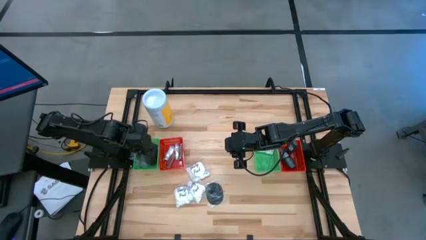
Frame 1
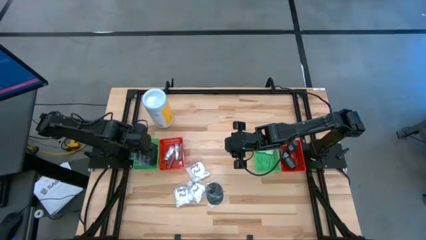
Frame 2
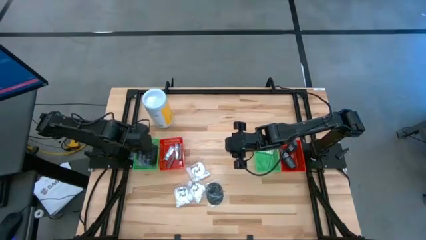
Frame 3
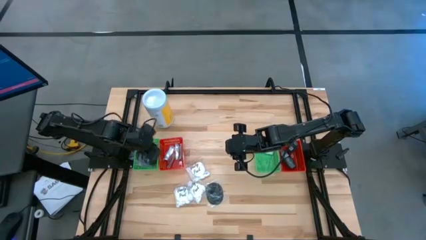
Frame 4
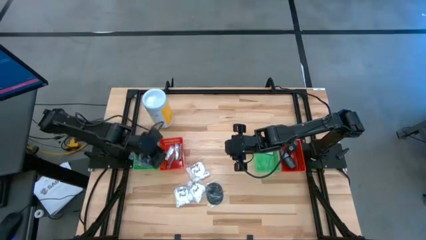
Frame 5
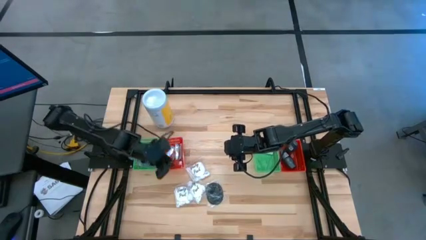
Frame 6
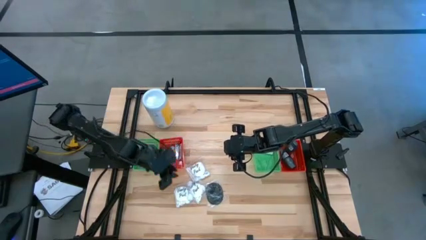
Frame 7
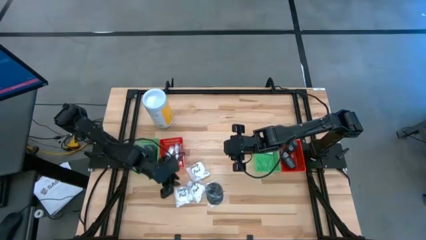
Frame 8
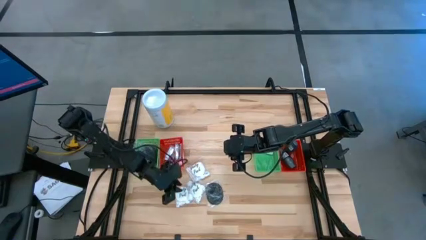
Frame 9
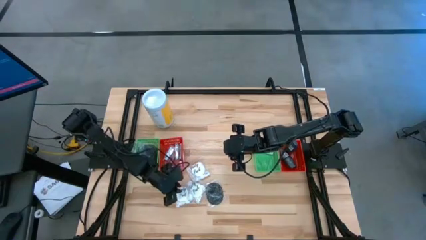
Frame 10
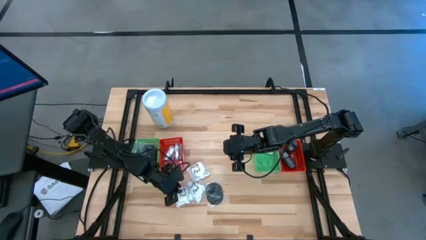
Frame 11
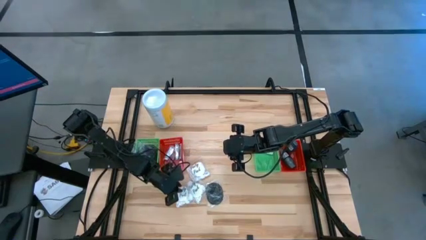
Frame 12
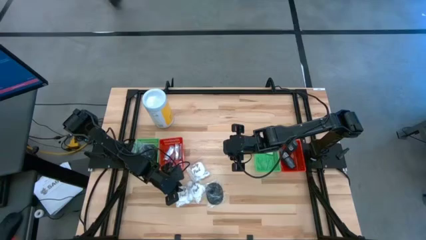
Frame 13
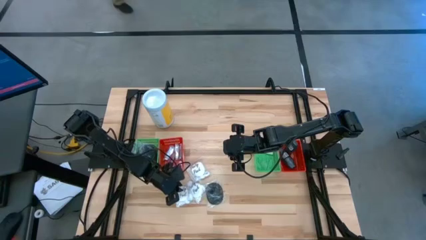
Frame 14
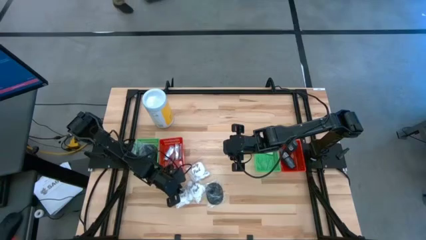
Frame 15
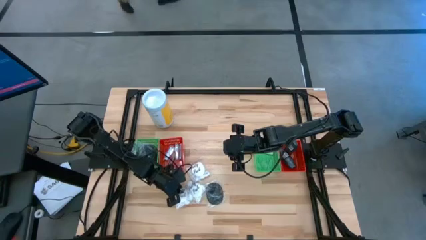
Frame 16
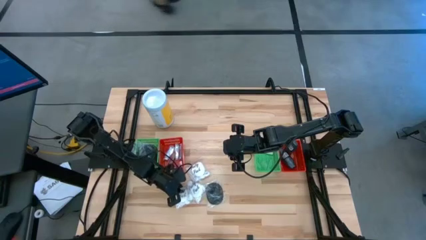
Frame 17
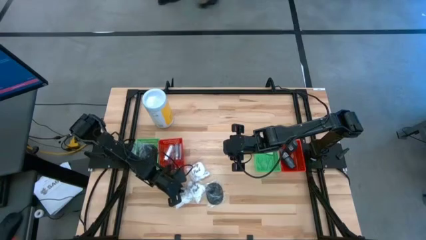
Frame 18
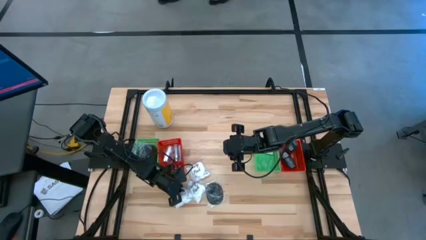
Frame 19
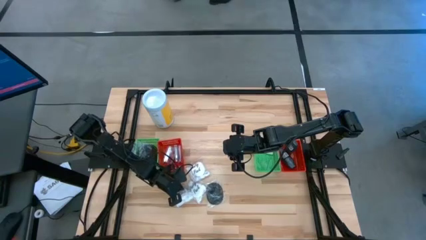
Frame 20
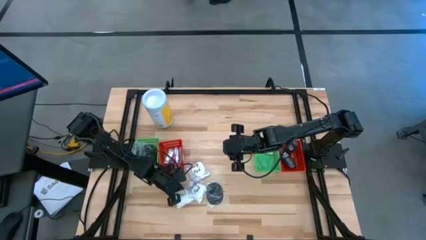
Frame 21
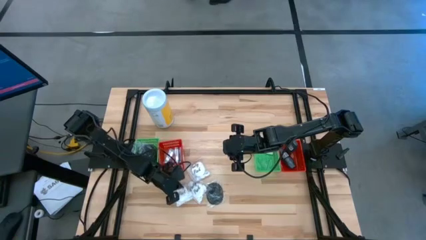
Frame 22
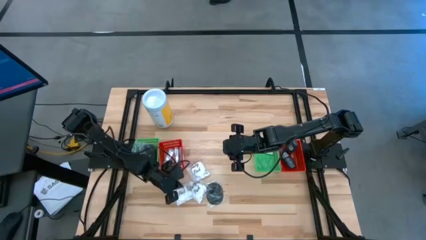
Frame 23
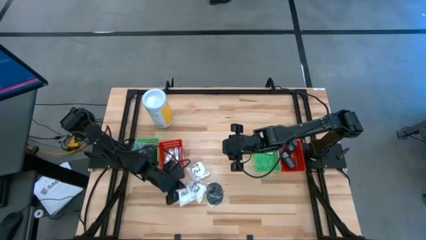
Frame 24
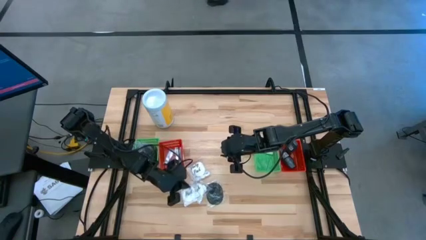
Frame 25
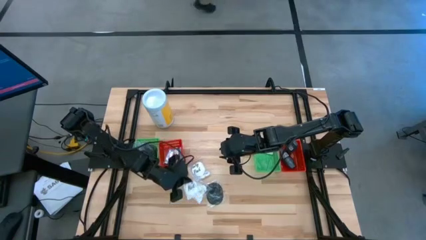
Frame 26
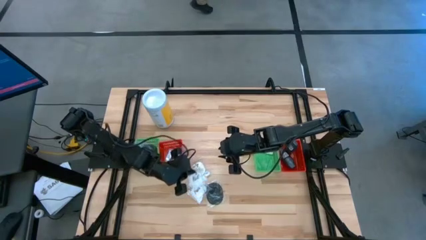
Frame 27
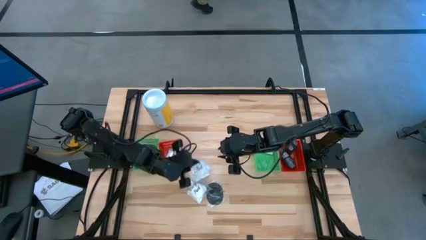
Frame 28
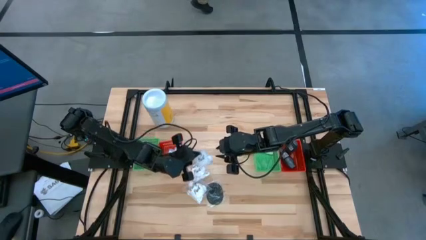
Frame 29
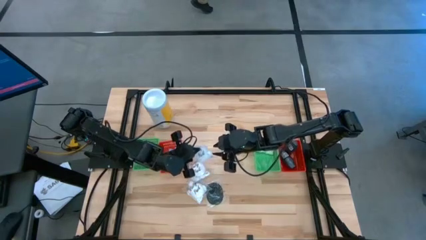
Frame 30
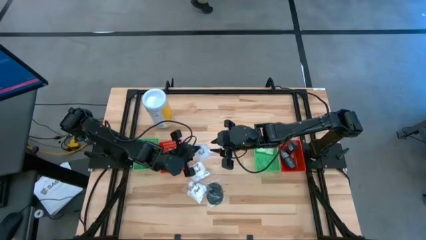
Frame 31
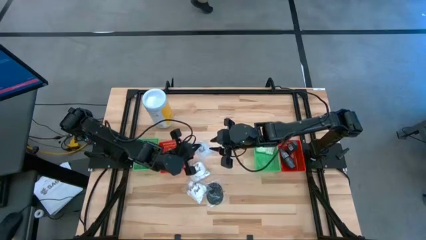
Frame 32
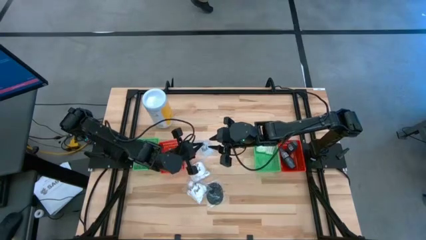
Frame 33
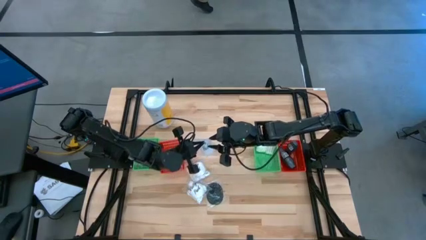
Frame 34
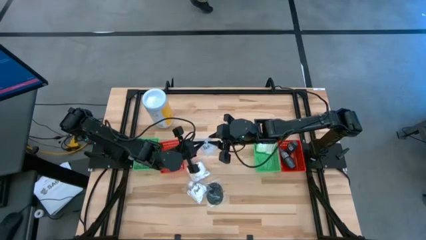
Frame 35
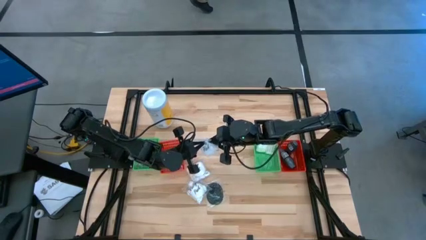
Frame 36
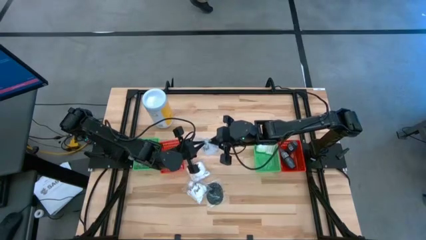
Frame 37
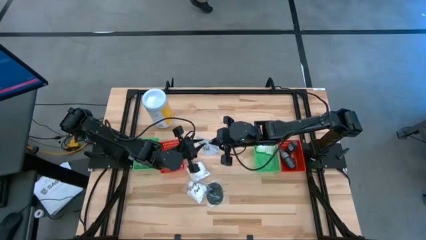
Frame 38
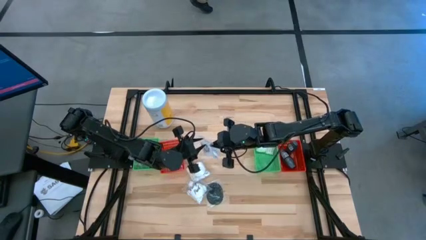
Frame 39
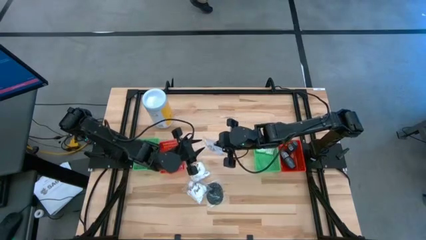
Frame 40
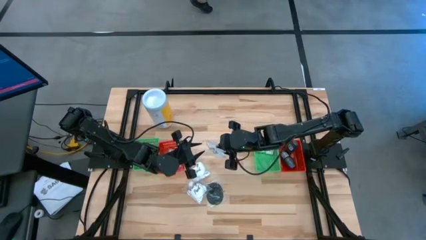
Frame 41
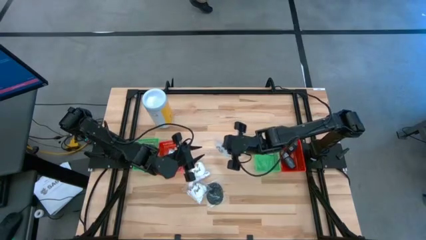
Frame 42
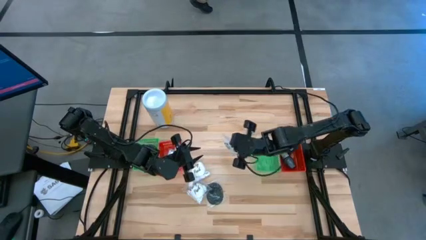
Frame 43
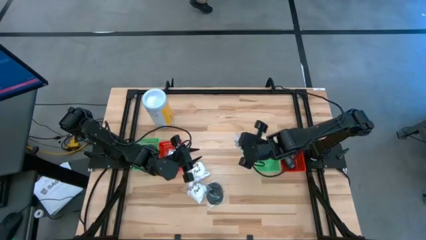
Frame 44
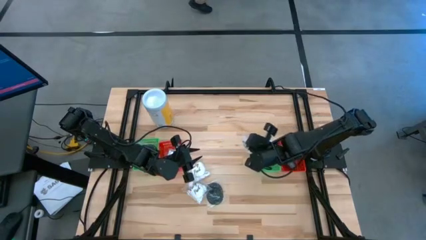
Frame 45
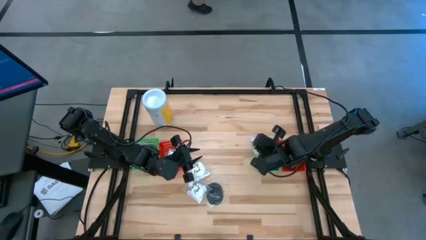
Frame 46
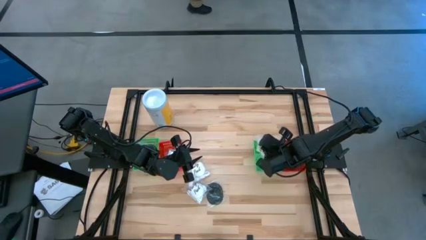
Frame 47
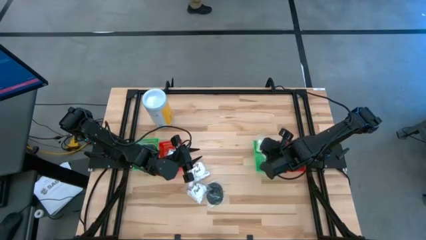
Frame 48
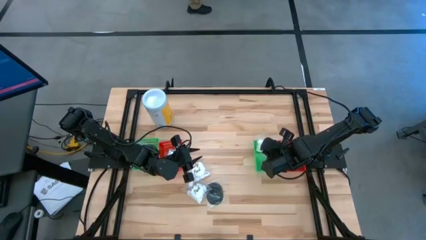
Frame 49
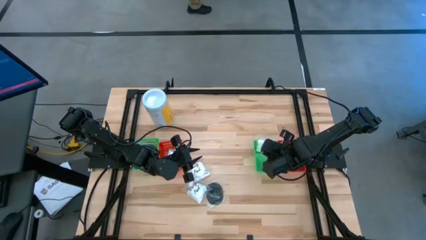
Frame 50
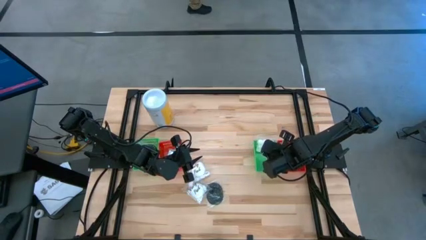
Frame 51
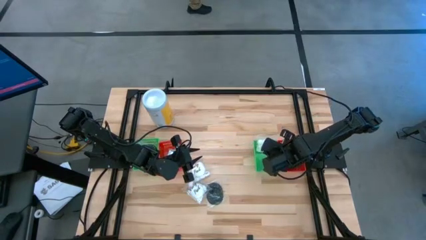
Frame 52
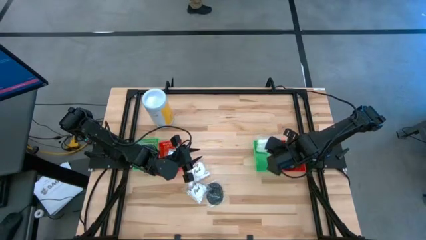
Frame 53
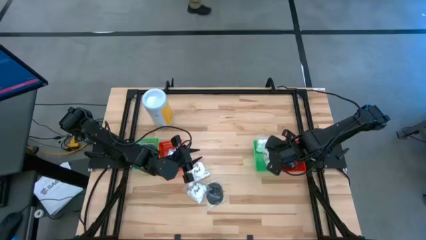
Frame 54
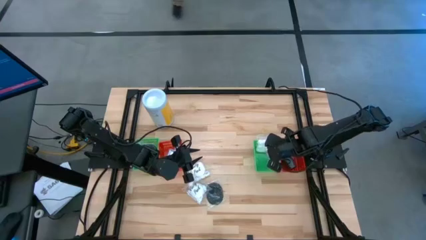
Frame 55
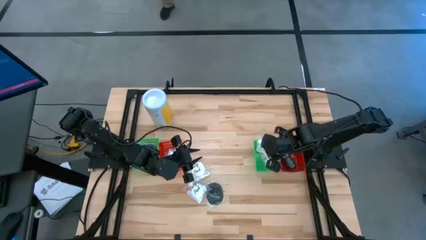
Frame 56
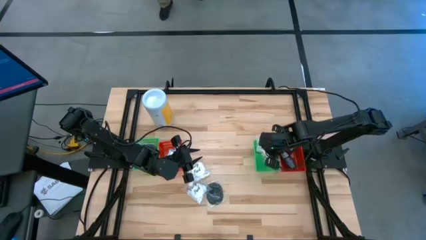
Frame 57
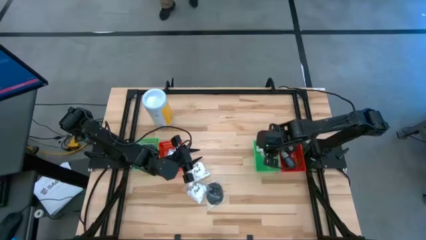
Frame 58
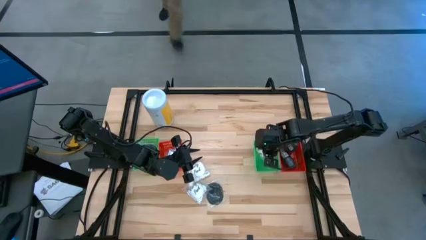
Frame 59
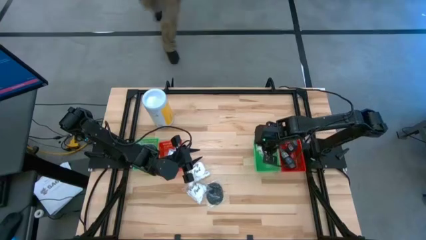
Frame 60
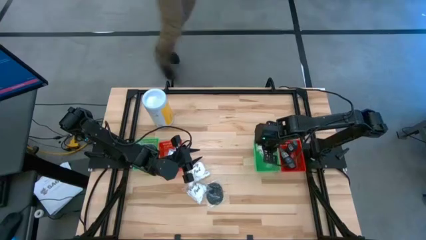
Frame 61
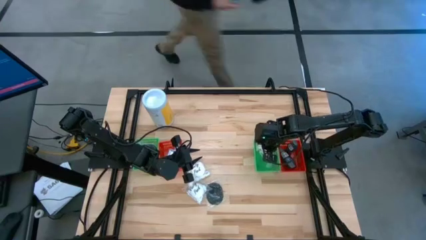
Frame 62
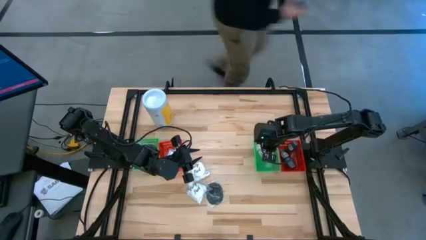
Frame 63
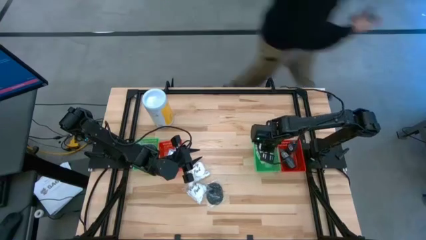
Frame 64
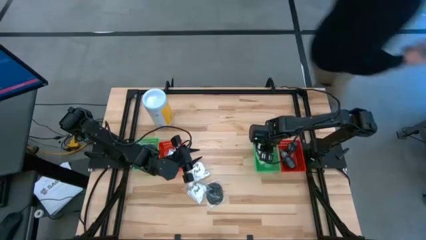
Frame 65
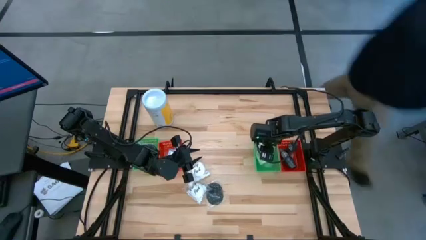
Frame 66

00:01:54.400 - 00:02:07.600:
Task: Pick & Place Travel size toiletries
Put the white cotton pack into the right green bin
